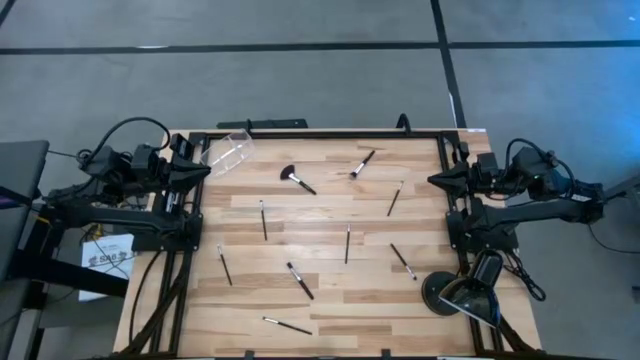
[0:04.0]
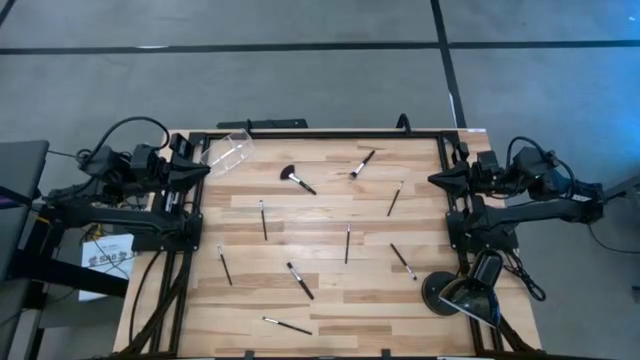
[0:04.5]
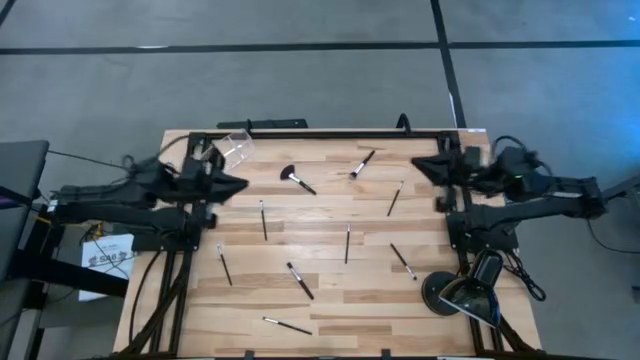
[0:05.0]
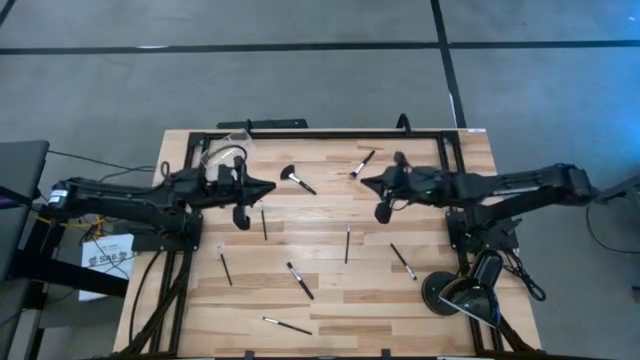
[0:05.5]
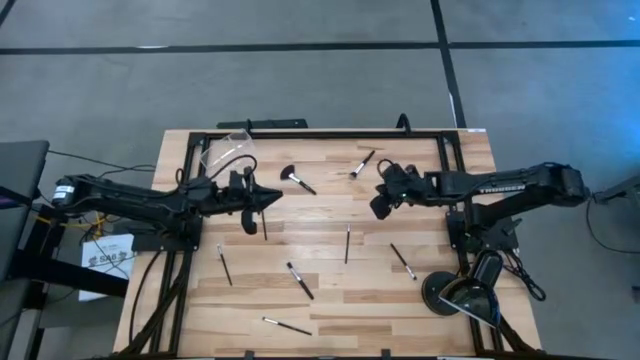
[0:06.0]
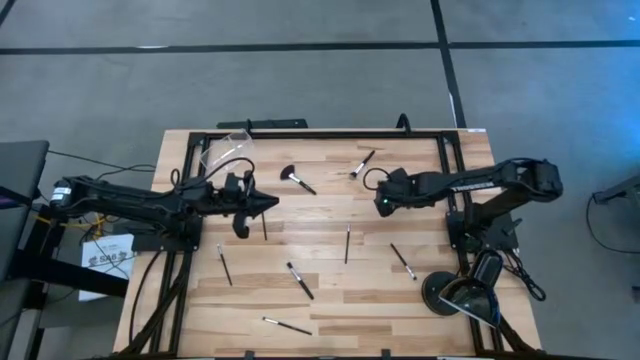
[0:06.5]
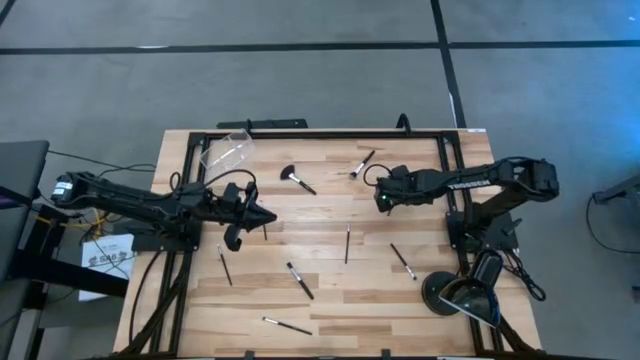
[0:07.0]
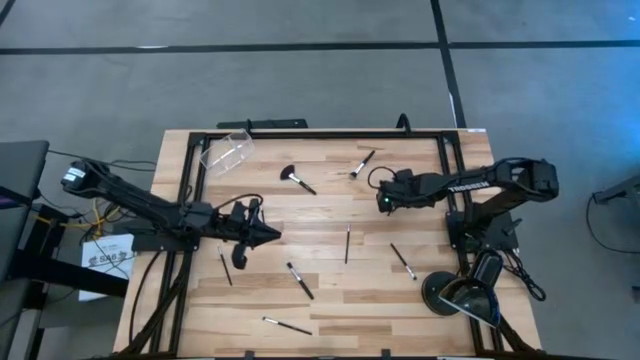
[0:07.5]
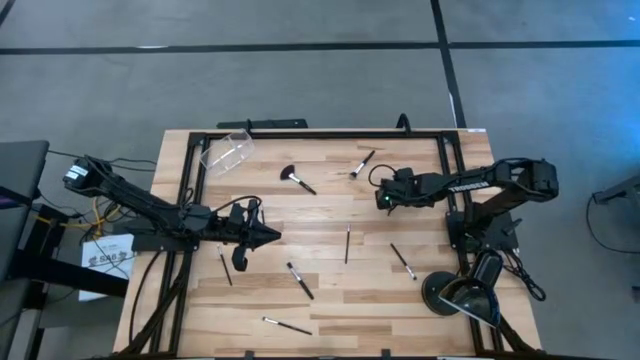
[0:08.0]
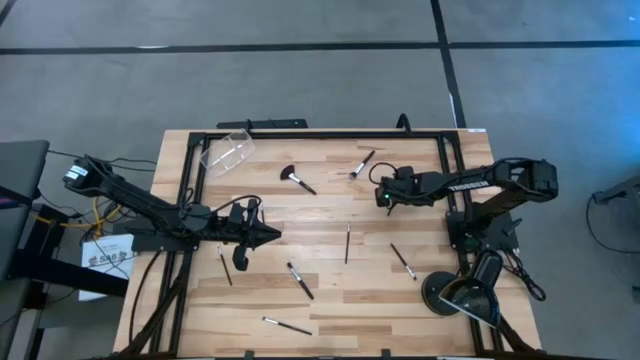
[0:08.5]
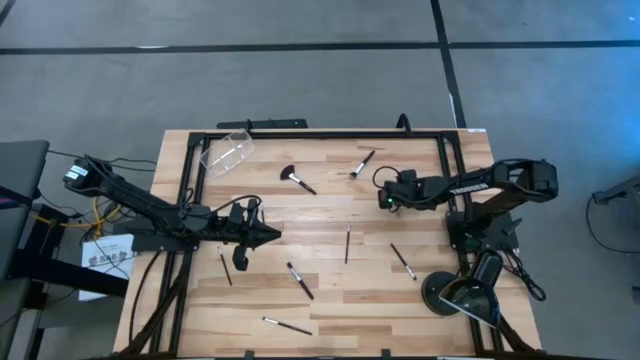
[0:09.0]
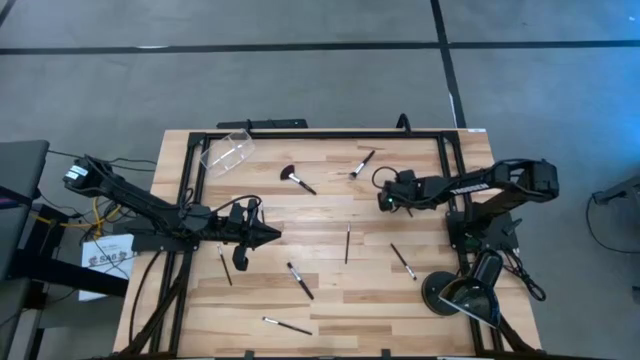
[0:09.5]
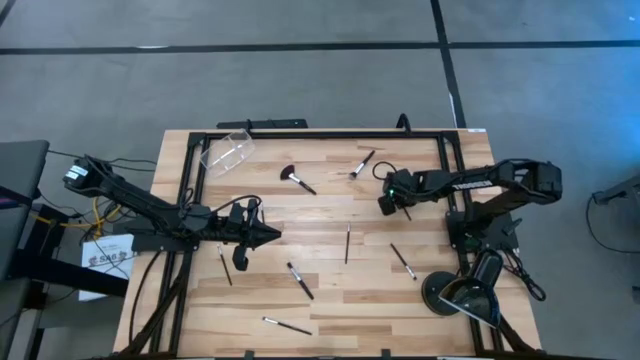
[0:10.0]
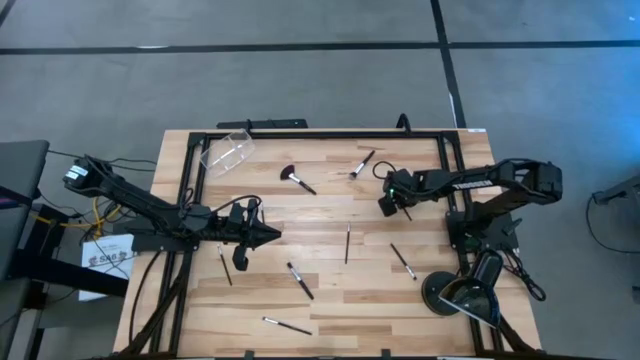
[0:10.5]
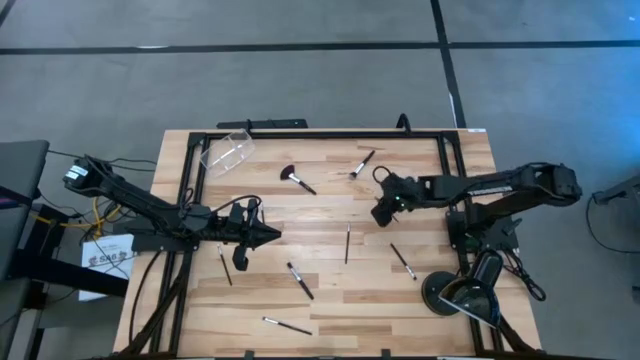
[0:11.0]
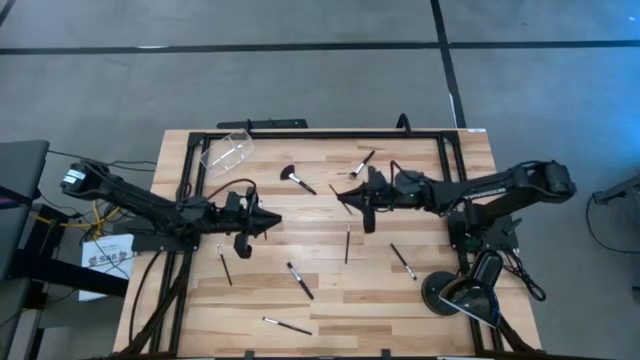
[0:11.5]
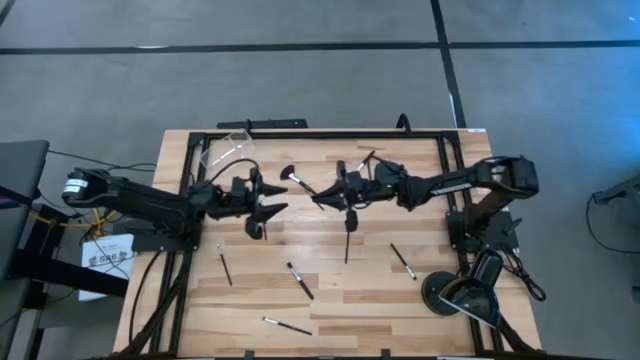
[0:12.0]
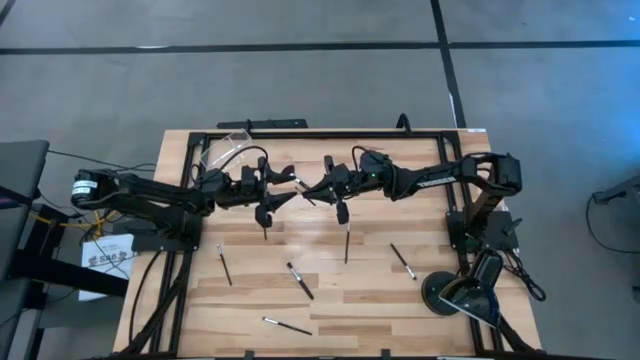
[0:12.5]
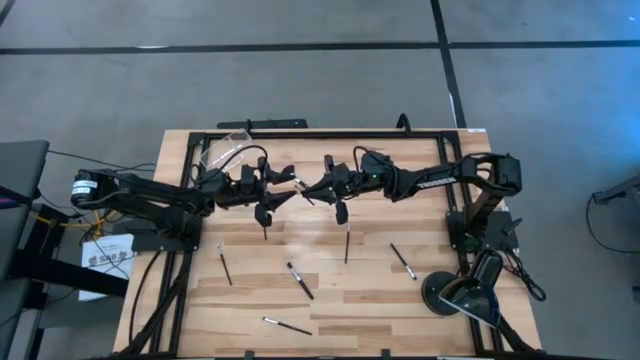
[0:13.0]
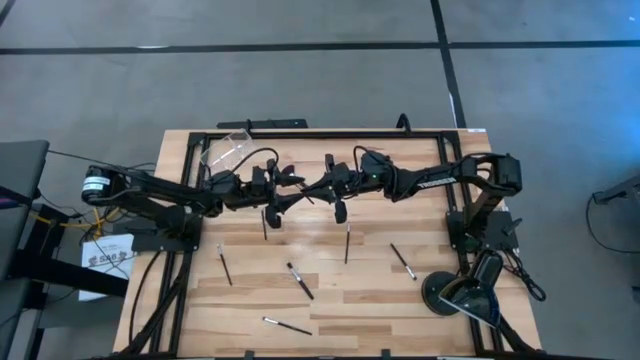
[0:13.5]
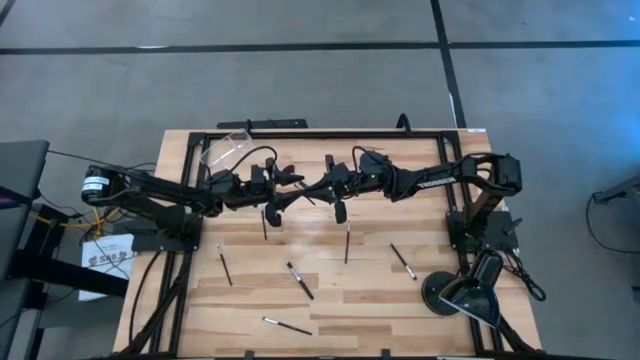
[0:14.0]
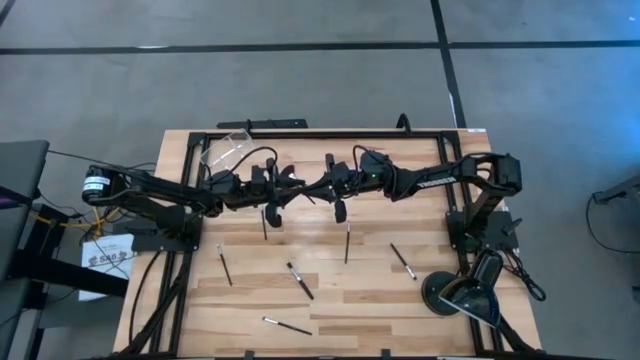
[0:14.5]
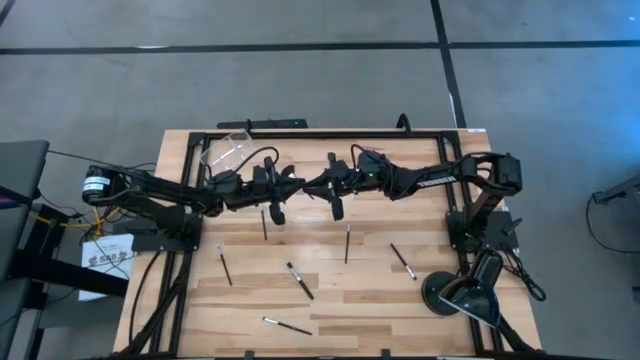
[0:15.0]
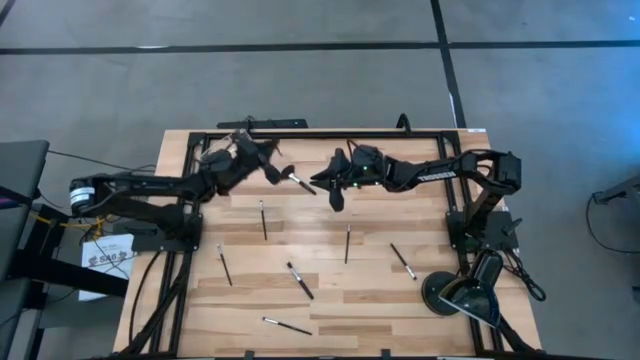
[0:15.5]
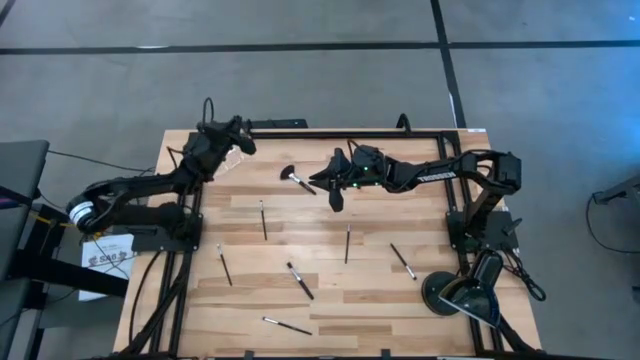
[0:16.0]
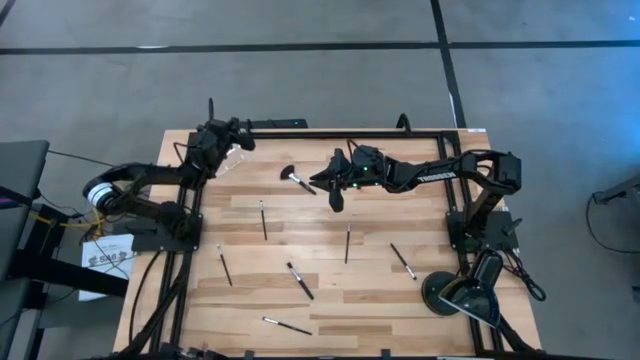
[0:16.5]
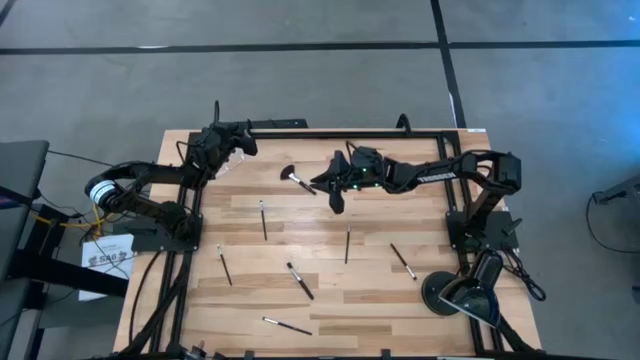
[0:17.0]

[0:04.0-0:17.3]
Task: Put items in baskets/containers
Put the eyeshadow brush into the transparent bin

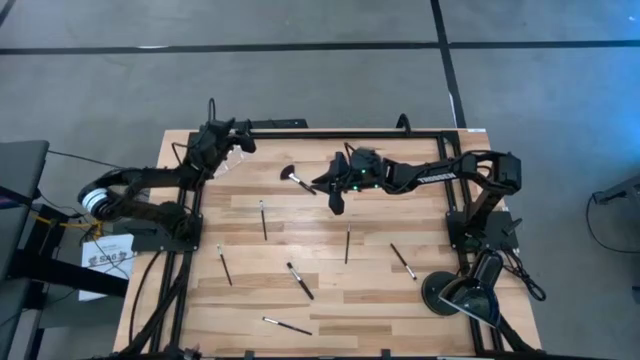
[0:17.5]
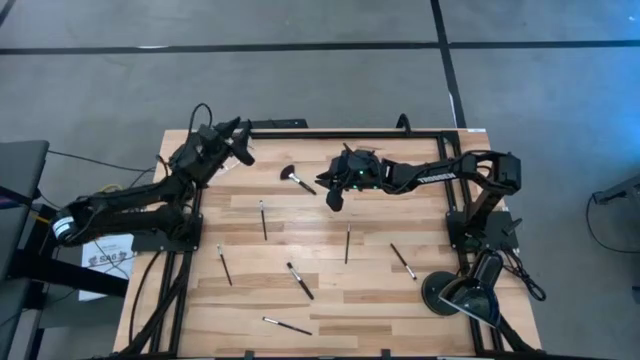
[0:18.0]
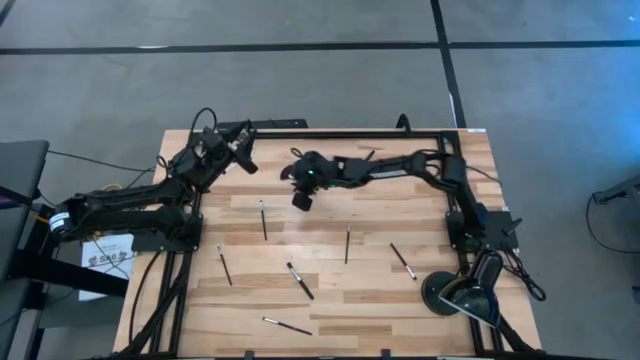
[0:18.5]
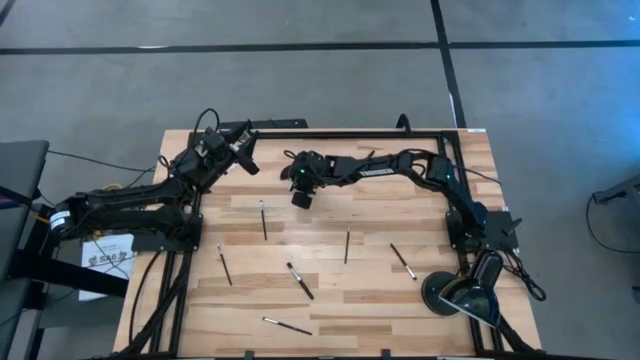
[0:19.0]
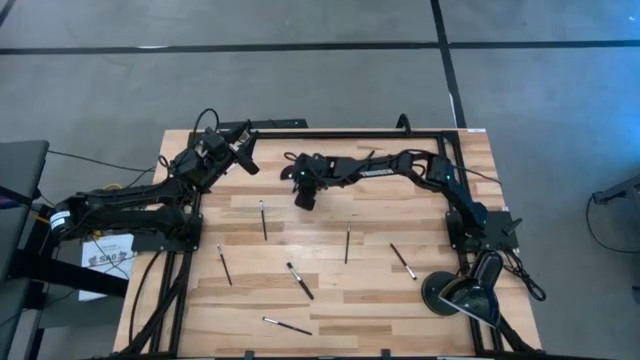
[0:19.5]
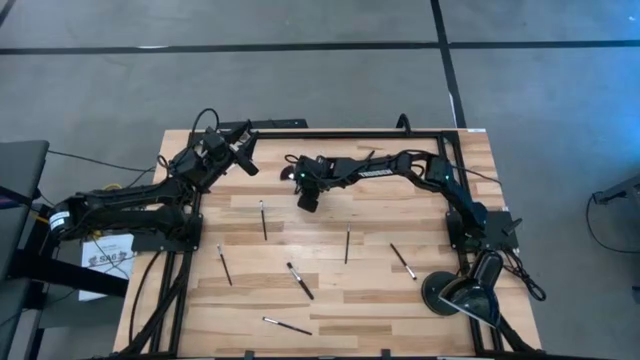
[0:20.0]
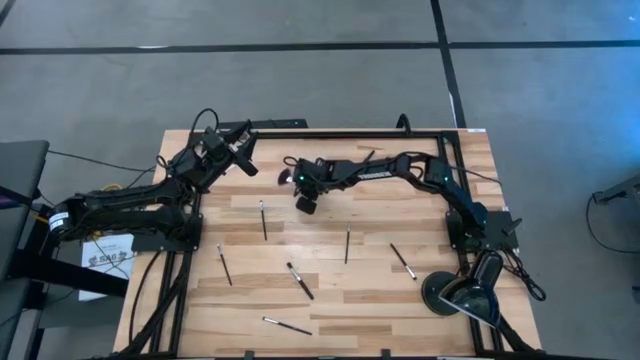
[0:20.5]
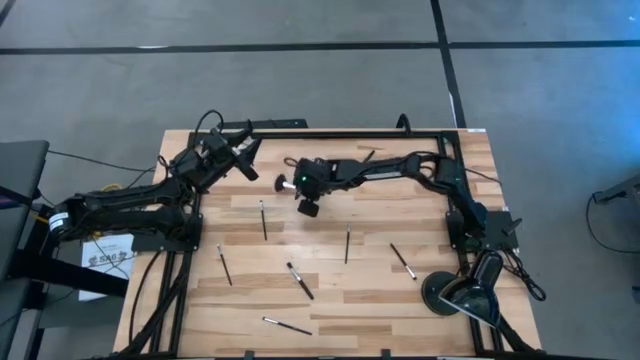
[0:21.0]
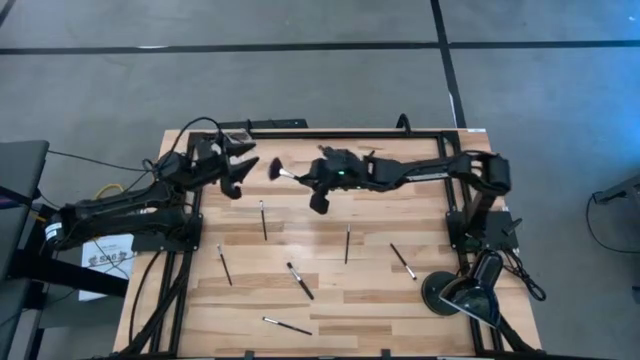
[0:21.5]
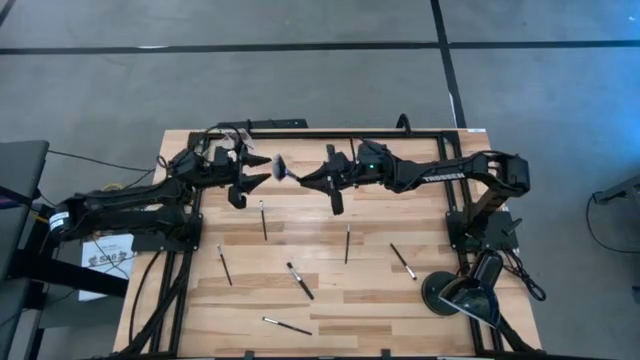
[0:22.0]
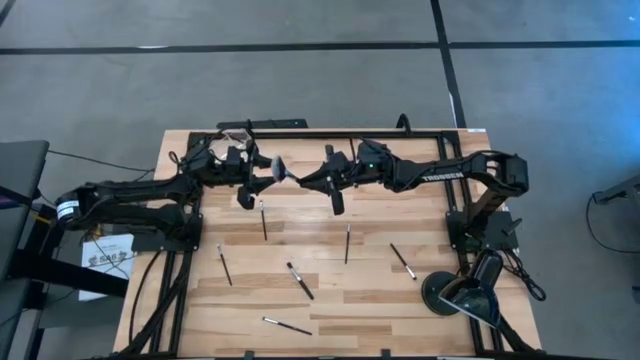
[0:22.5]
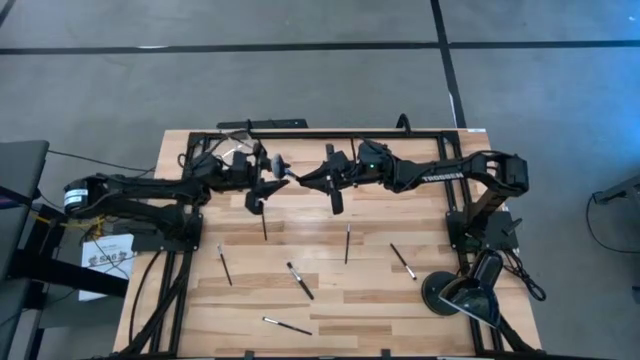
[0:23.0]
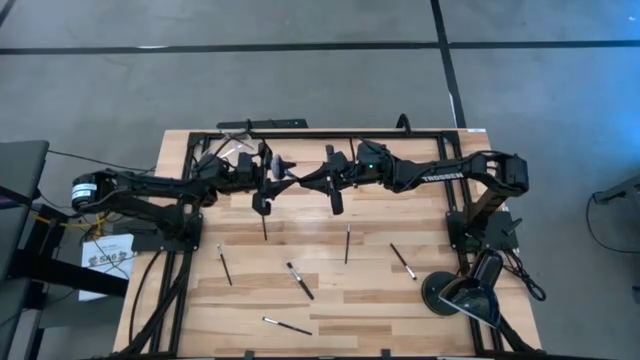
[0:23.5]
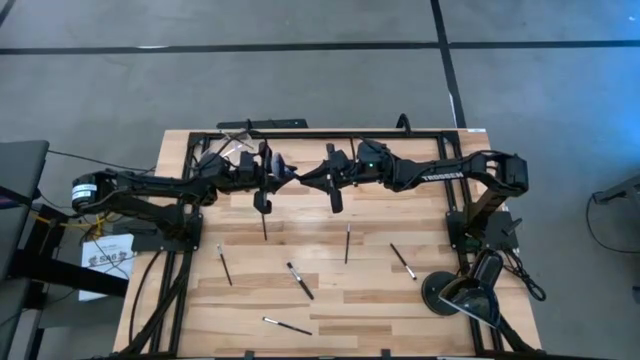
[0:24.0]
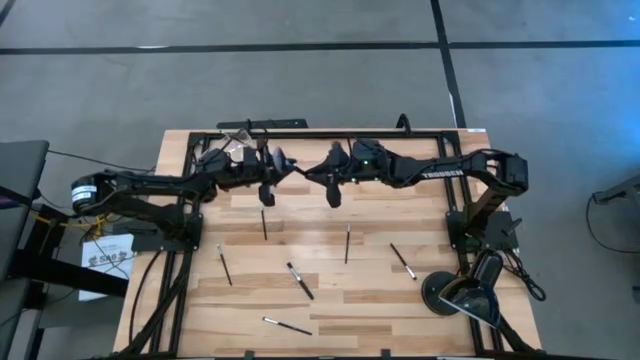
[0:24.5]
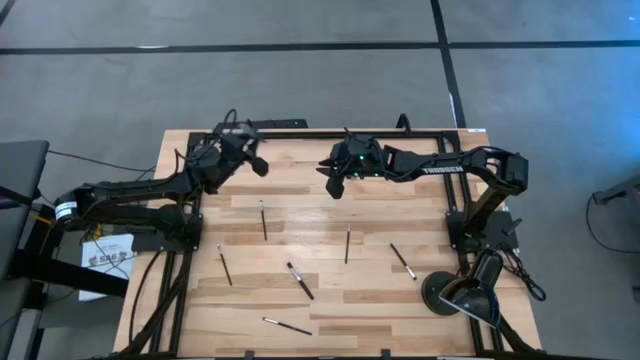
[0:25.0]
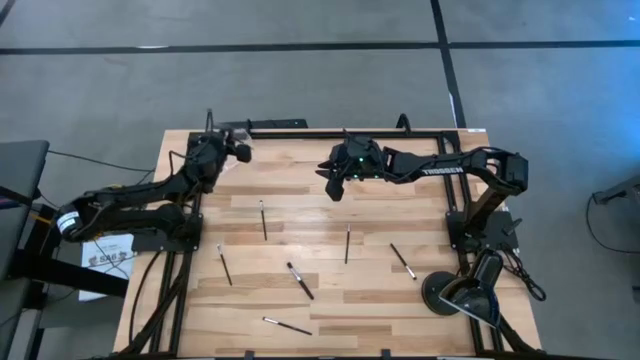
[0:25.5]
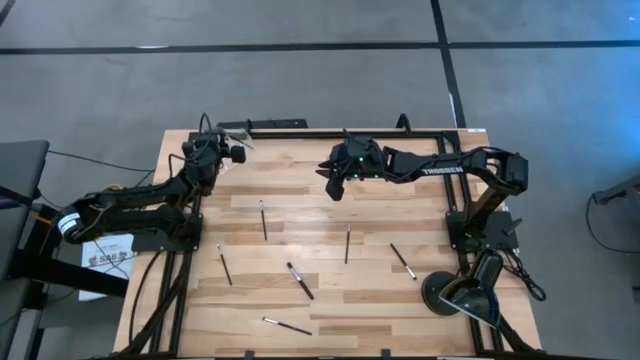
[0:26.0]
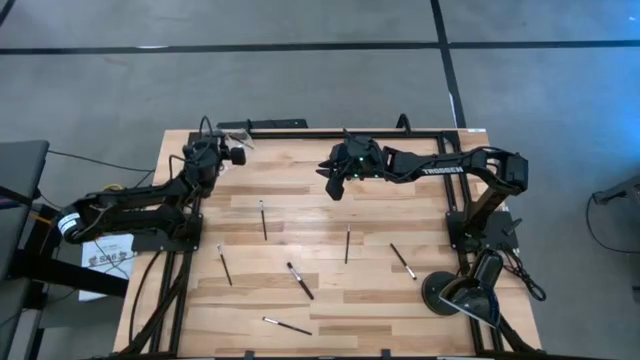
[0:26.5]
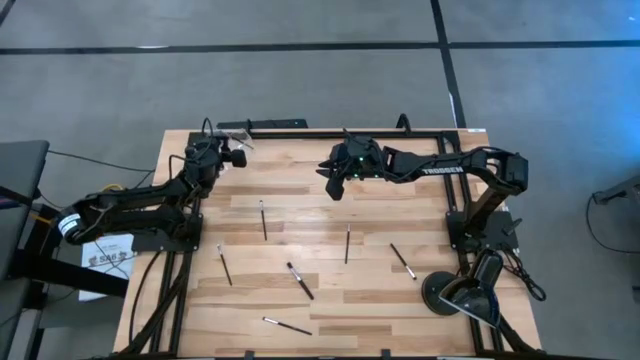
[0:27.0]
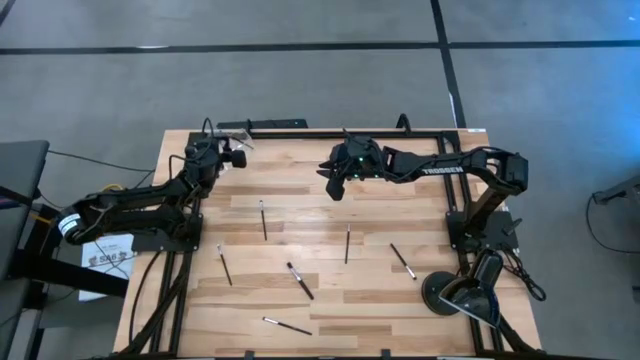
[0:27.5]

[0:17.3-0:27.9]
Put the highlighter brush into the transparent bin
